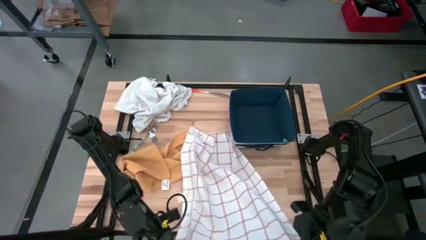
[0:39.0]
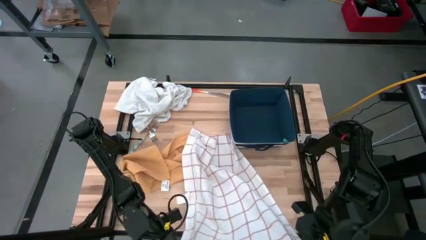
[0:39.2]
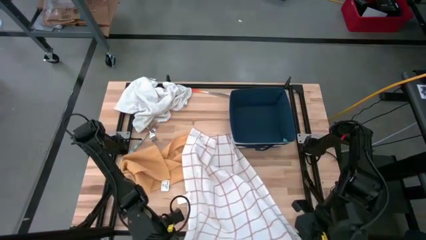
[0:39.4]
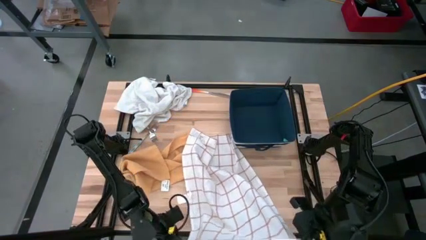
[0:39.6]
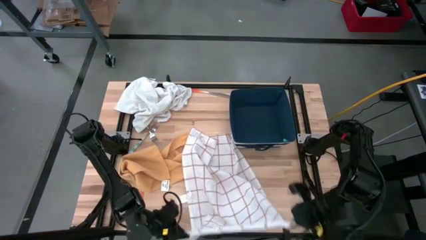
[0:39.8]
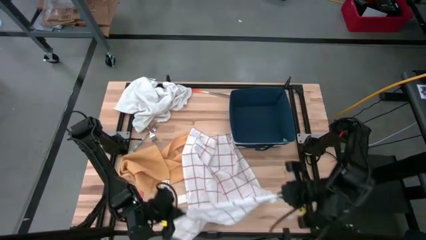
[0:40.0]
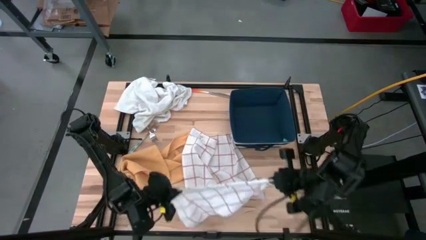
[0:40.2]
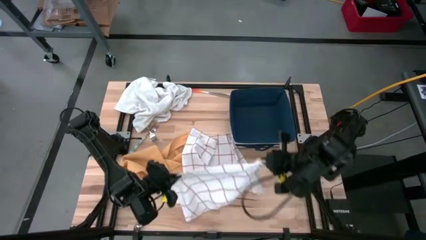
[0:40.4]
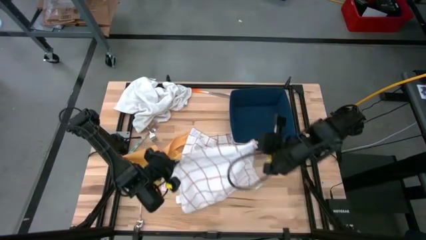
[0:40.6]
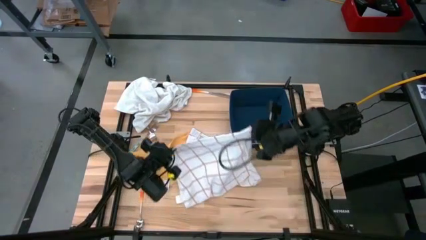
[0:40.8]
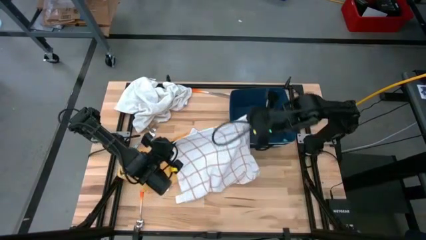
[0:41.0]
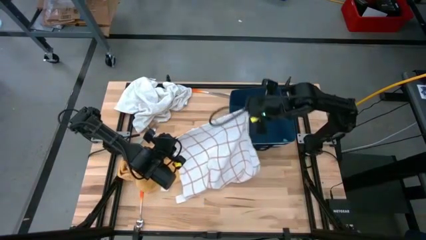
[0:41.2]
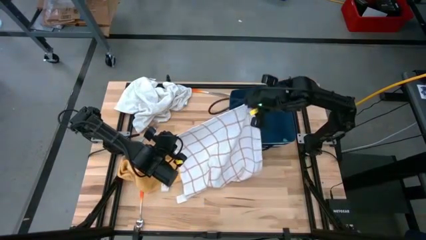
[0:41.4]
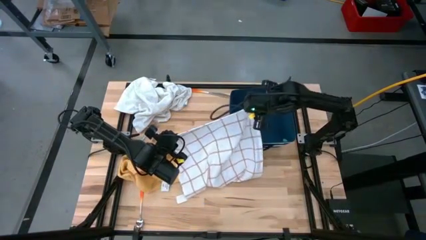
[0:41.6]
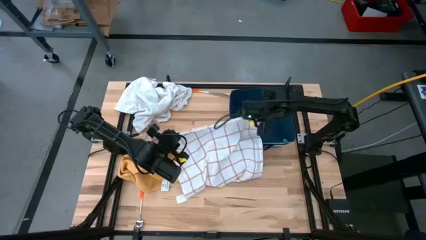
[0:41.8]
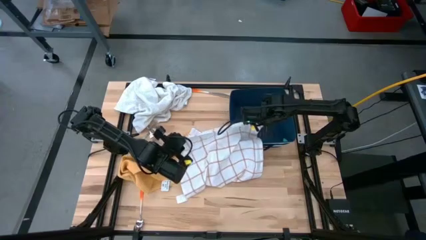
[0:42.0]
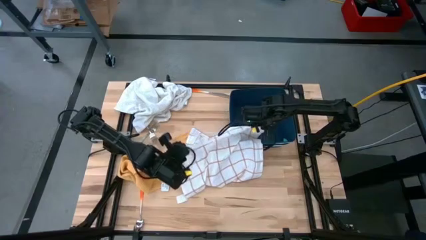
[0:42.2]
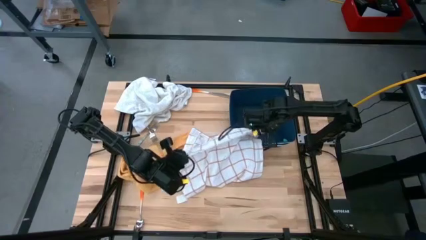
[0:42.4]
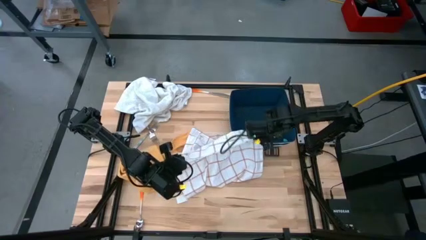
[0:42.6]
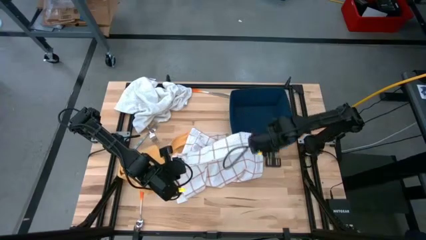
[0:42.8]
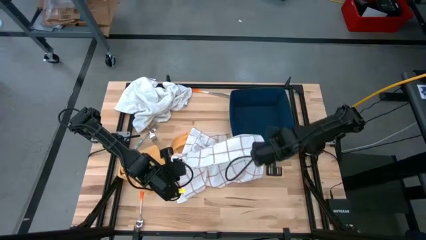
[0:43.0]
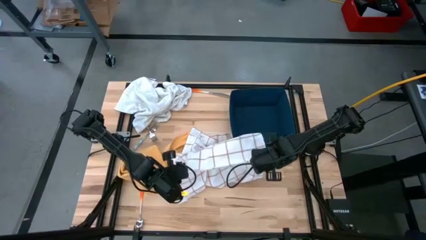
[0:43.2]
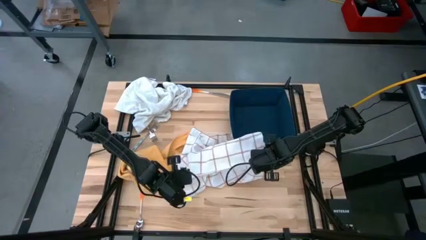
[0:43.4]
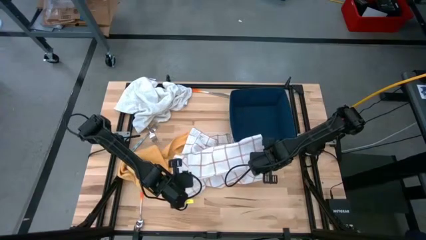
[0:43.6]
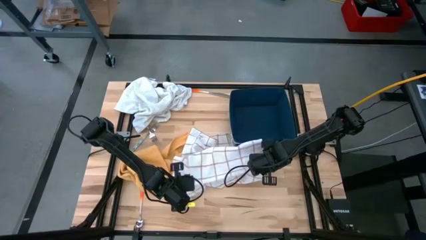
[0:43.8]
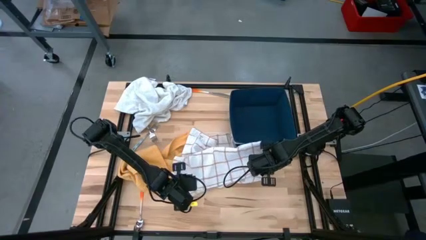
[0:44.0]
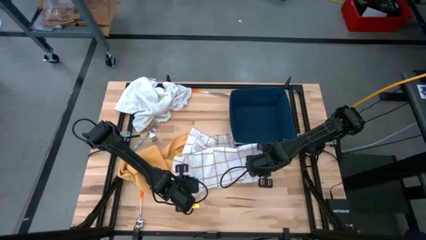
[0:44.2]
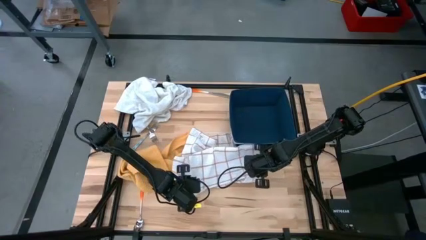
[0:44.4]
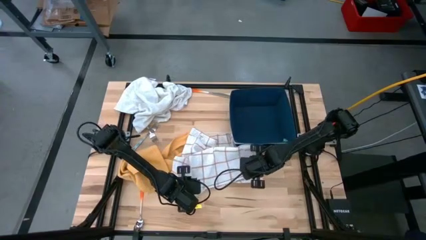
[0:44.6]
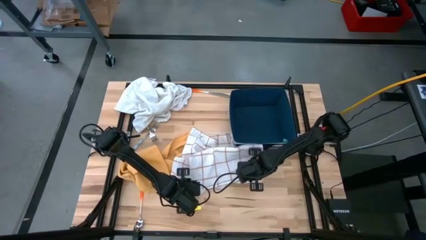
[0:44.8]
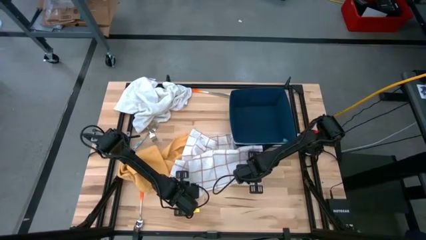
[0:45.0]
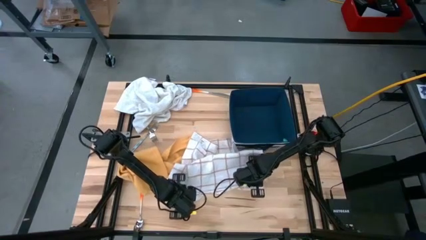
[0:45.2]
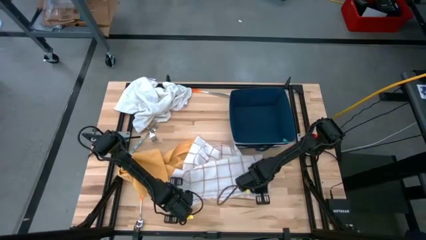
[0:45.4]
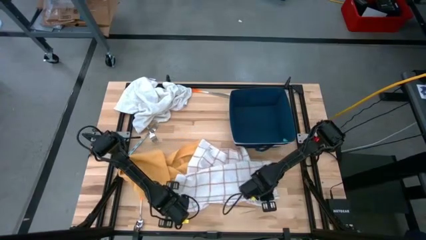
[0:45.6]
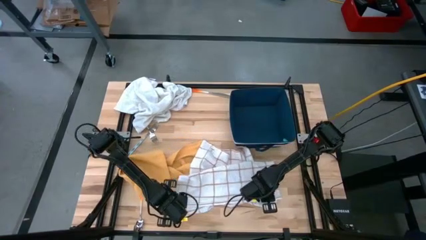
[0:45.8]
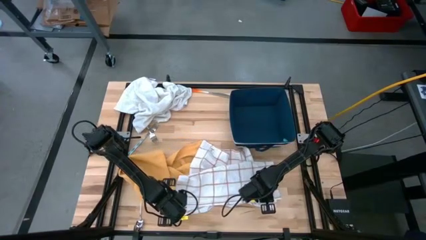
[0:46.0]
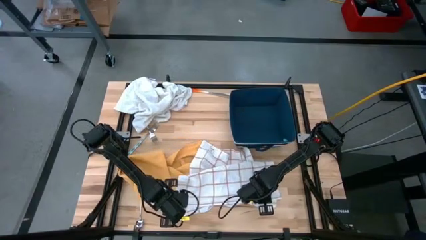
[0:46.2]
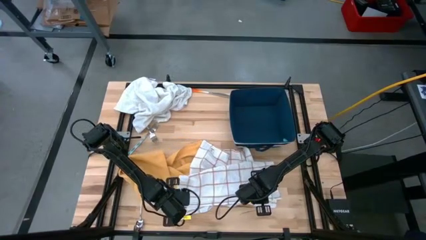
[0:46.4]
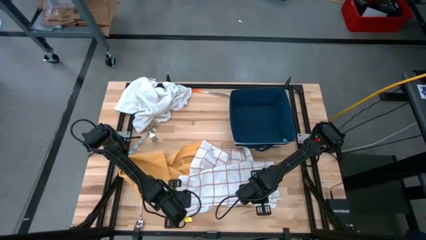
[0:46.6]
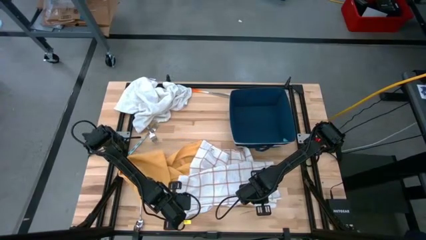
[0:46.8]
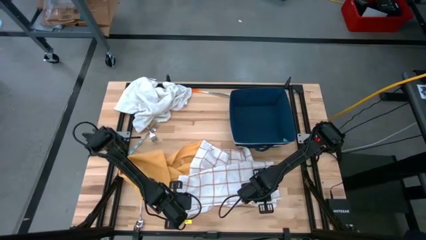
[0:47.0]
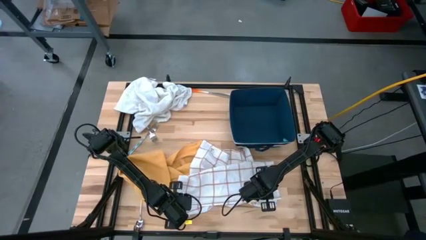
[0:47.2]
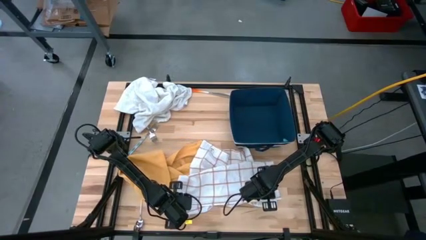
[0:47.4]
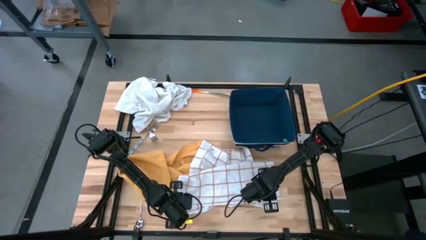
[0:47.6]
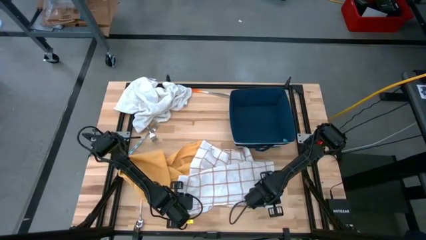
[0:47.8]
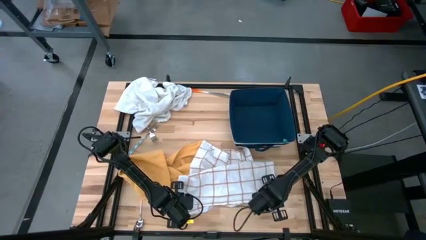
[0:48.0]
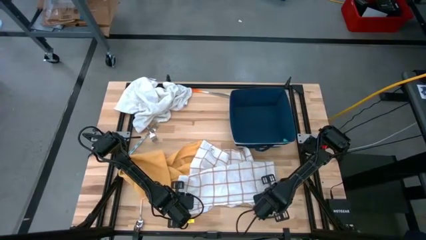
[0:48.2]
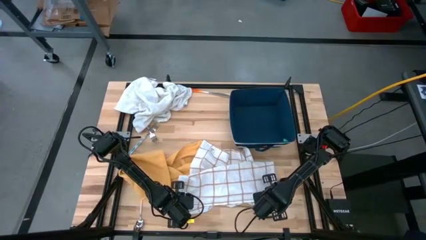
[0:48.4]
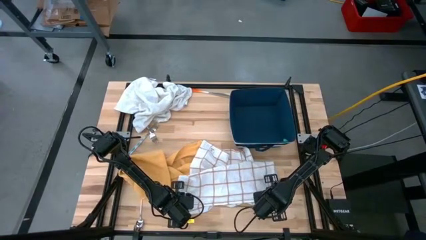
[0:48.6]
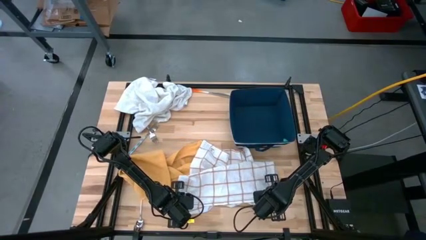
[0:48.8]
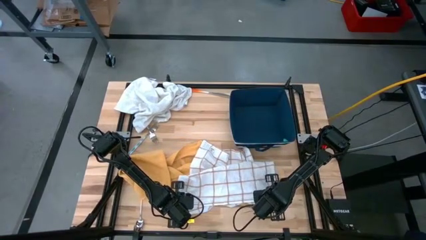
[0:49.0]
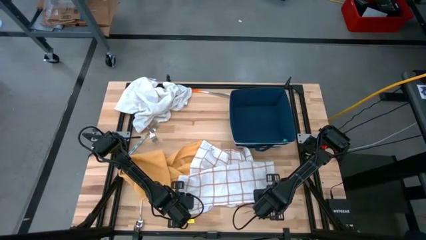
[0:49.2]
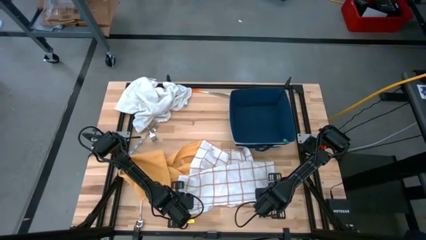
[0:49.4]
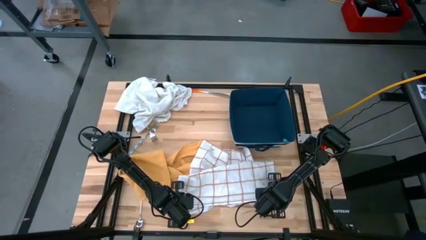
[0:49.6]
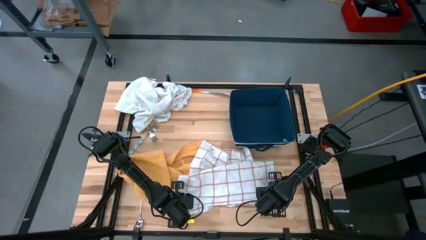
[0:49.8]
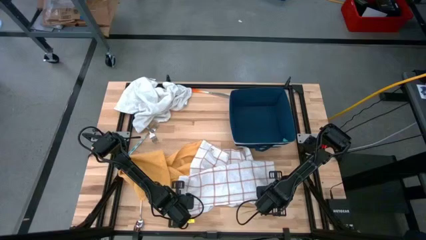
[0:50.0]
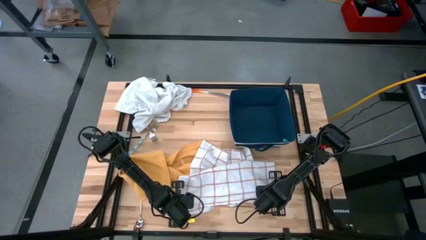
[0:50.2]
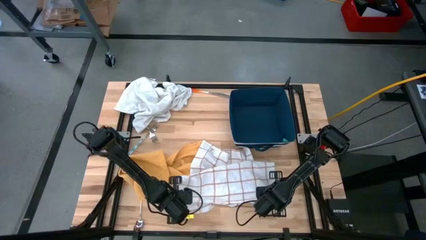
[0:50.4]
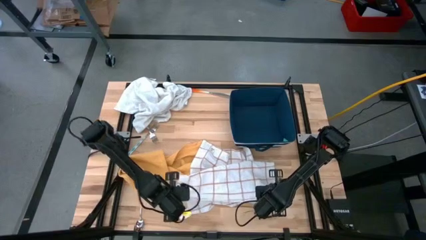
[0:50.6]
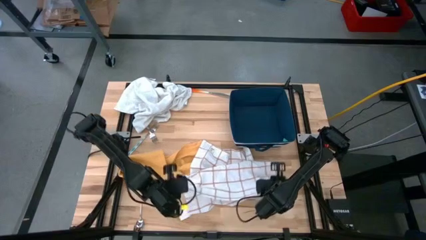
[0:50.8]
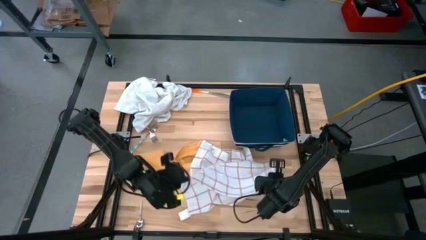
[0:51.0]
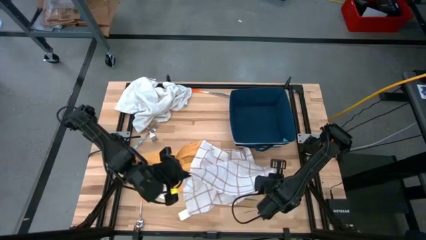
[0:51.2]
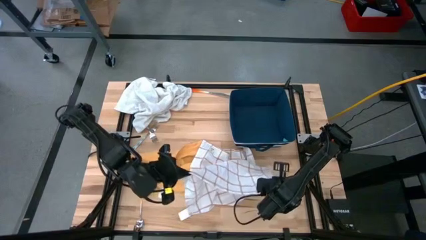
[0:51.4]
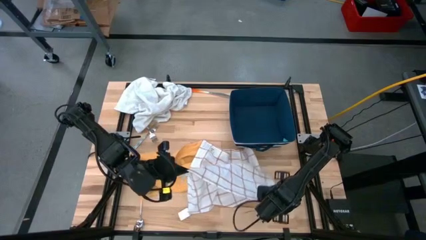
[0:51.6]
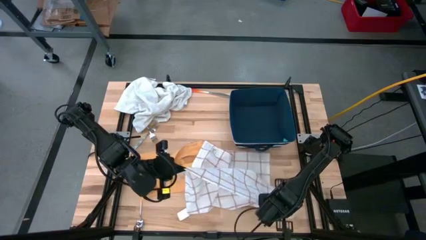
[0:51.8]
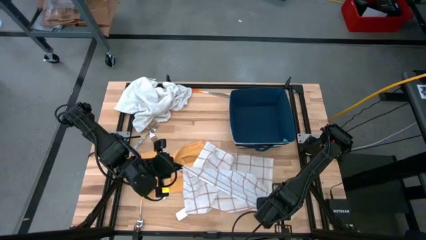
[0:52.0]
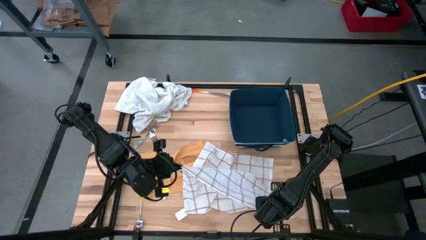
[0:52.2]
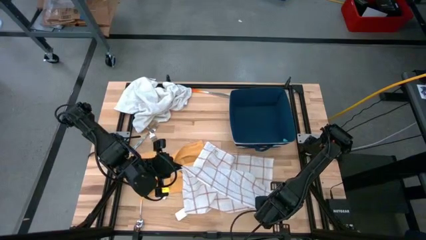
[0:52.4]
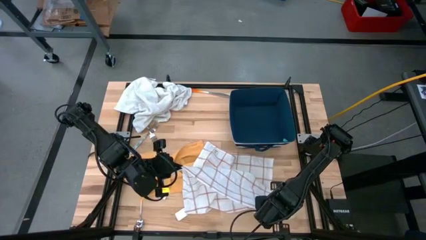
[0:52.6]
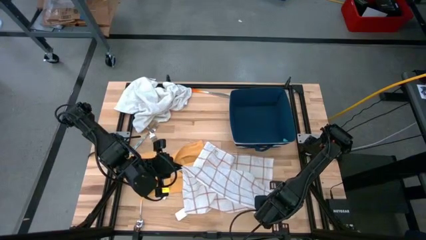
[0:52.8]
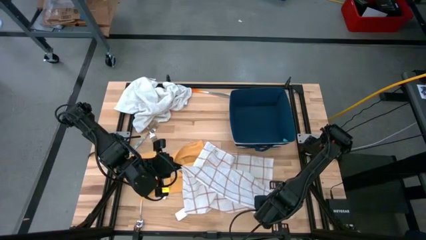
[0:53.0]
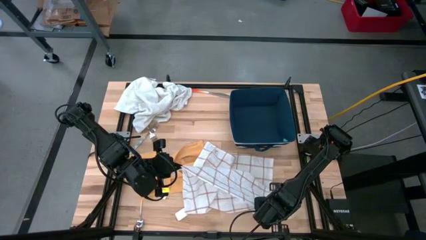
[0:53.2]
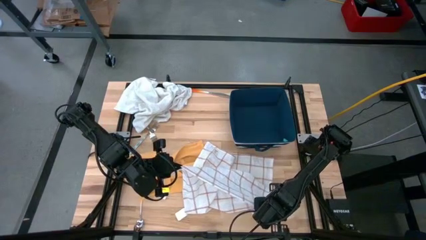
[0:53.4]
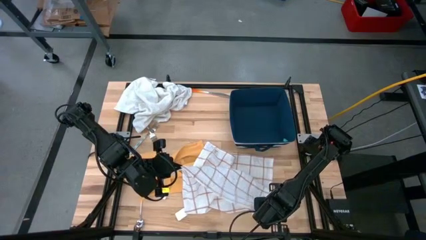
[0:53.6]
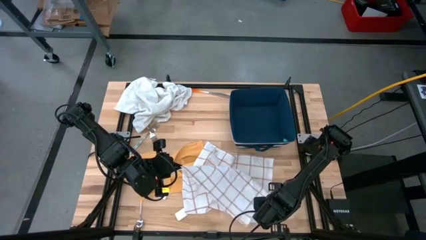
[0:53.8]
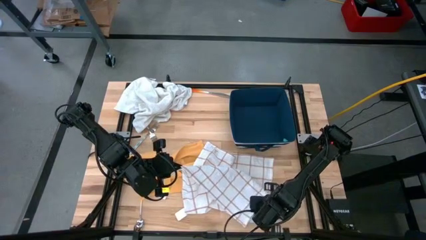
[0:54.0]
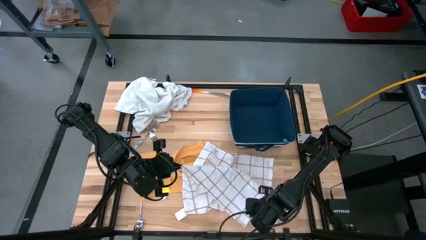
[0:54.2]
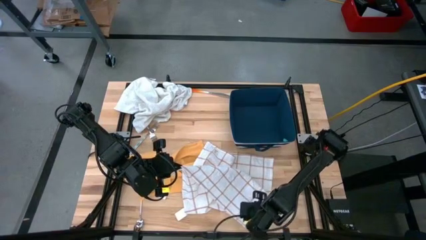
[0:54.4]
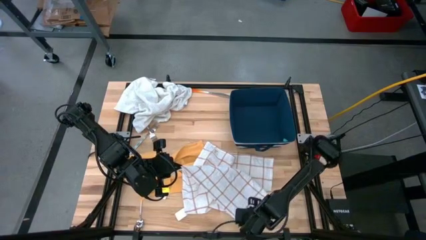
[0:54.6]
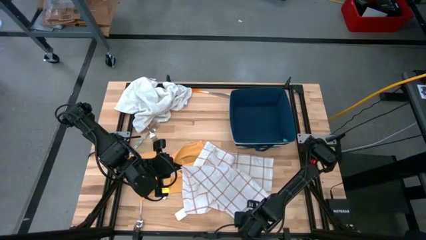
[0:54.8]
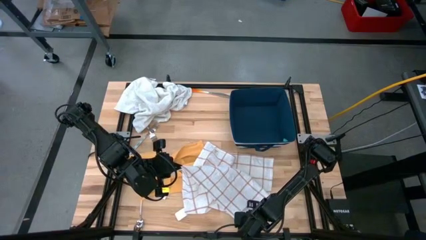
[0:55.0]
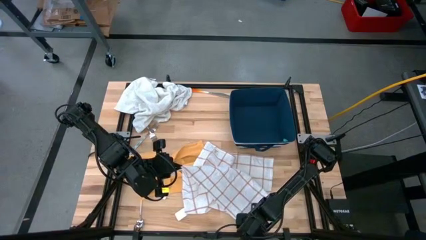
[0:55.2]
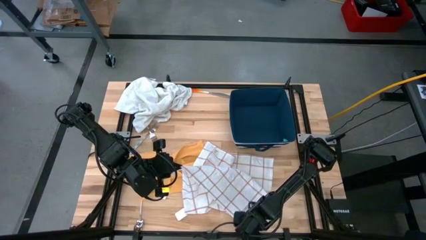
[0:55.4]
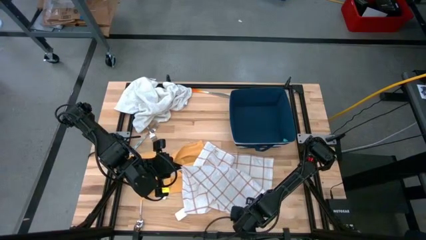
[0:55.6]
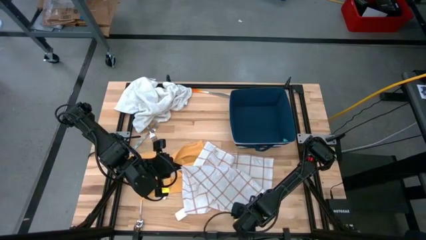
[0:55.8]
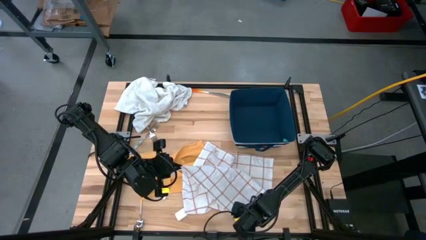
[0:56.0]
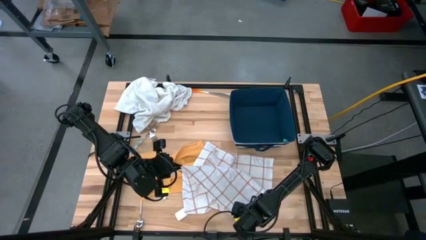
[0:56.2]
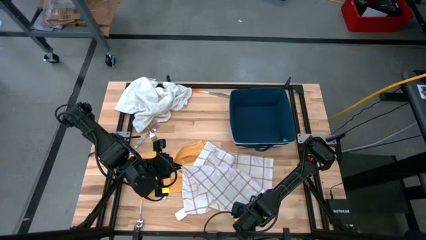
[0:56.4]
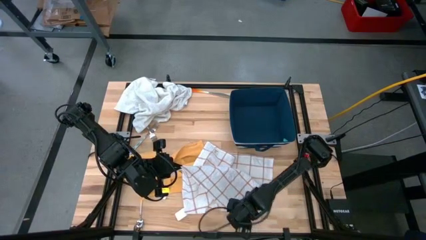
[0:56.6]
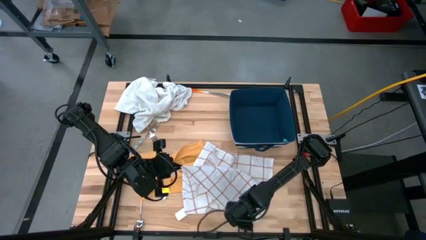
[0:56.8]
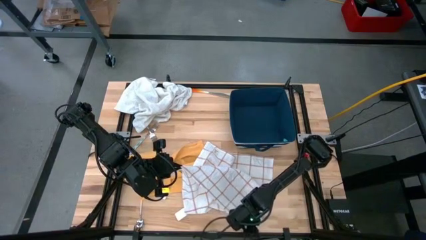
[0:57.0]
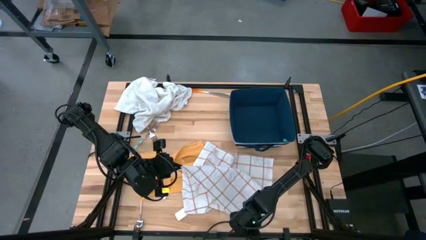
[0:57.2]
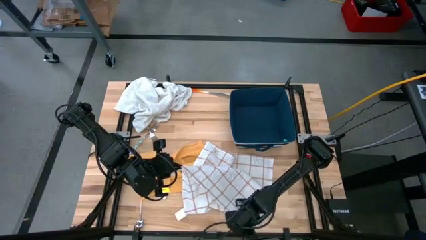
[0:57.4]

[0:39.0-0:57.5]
Task: Fold towel
Fold the white-and-brown checkered towel
